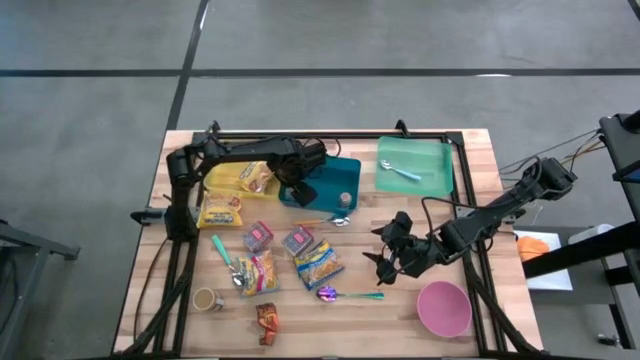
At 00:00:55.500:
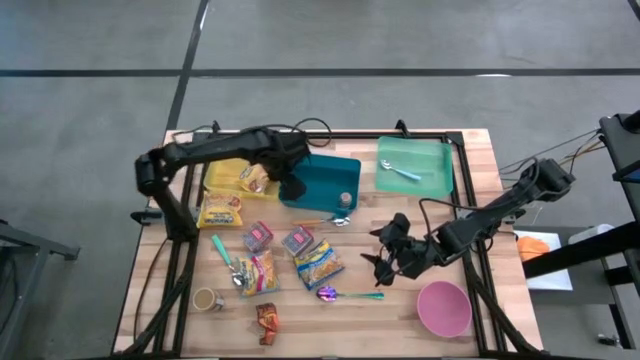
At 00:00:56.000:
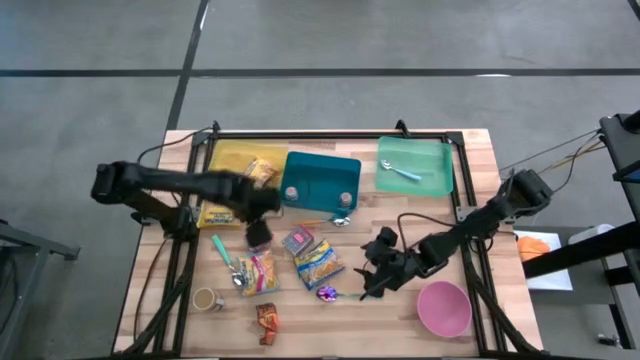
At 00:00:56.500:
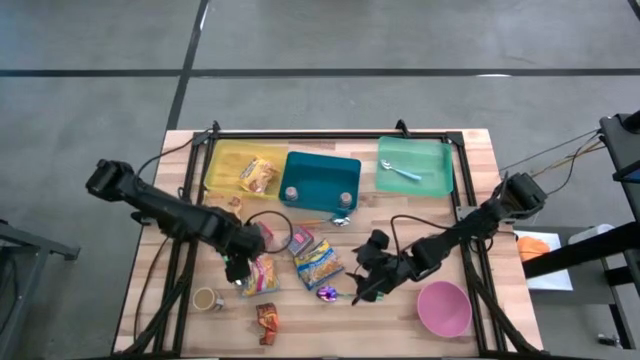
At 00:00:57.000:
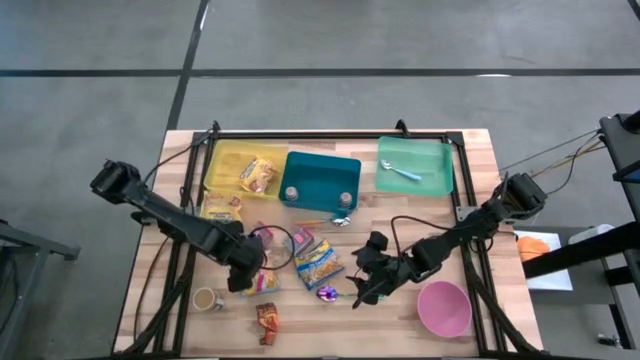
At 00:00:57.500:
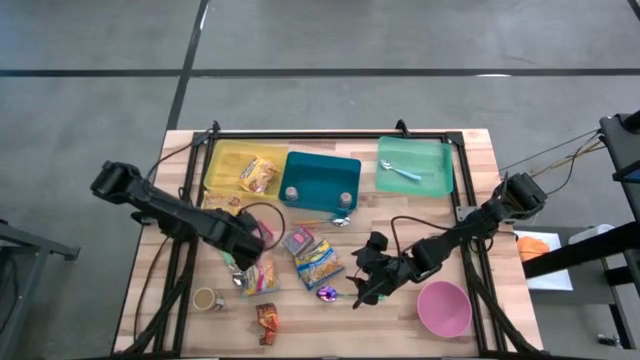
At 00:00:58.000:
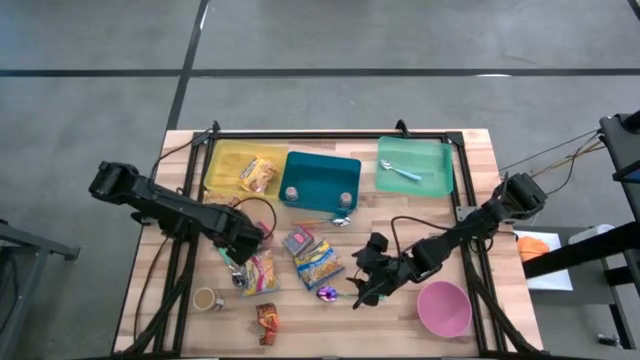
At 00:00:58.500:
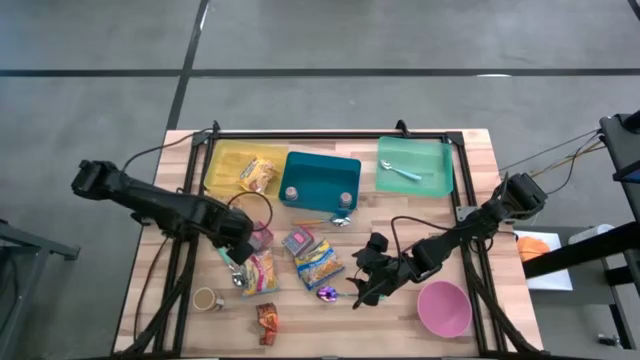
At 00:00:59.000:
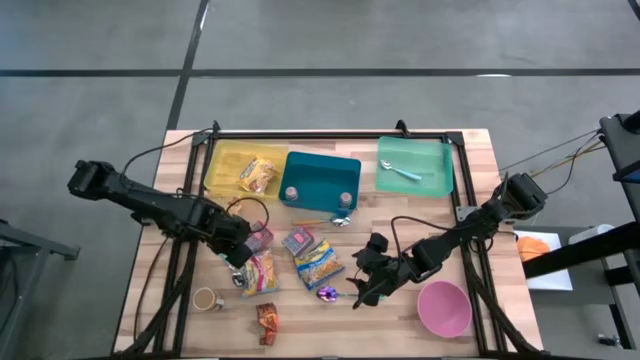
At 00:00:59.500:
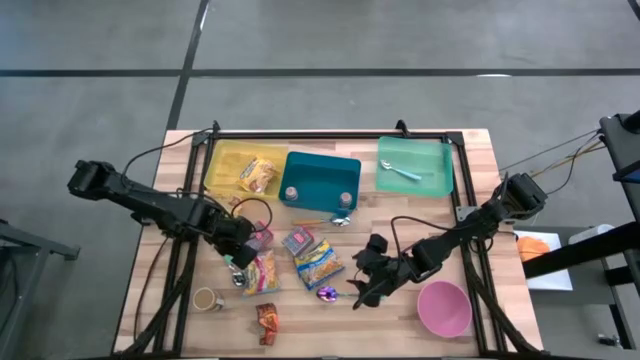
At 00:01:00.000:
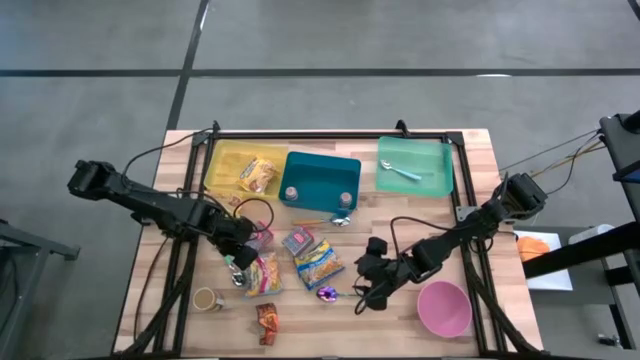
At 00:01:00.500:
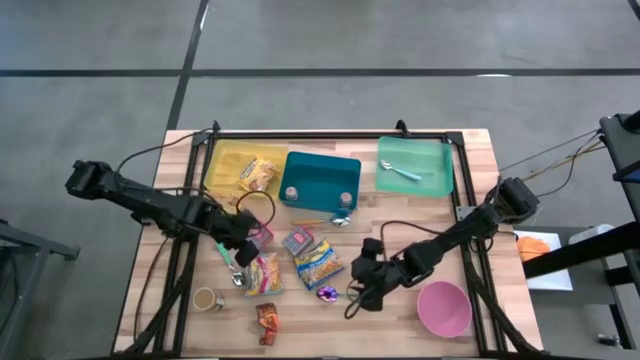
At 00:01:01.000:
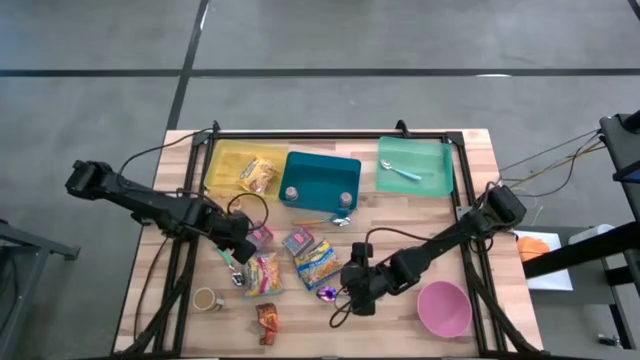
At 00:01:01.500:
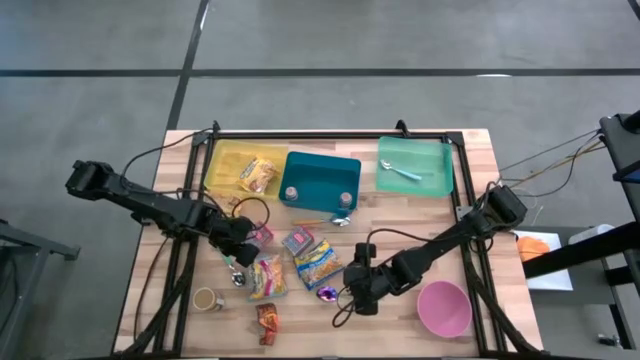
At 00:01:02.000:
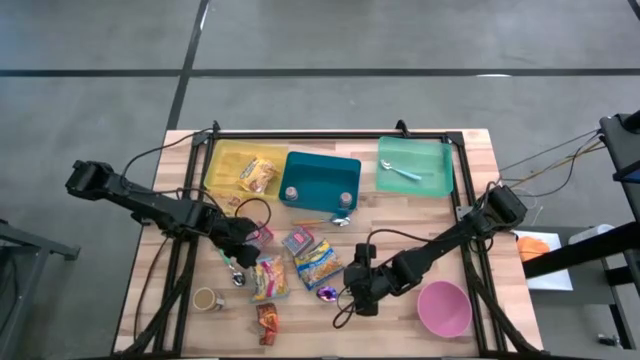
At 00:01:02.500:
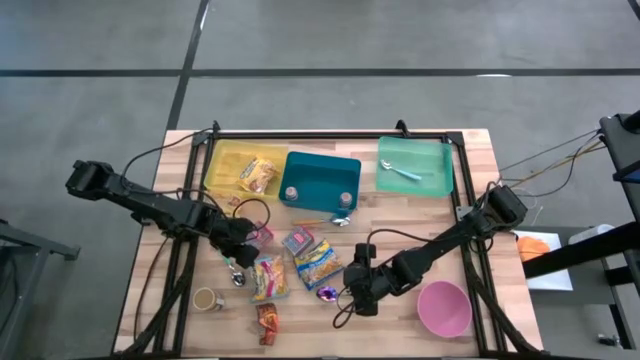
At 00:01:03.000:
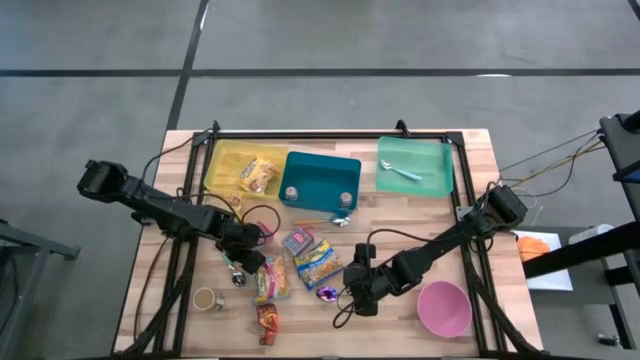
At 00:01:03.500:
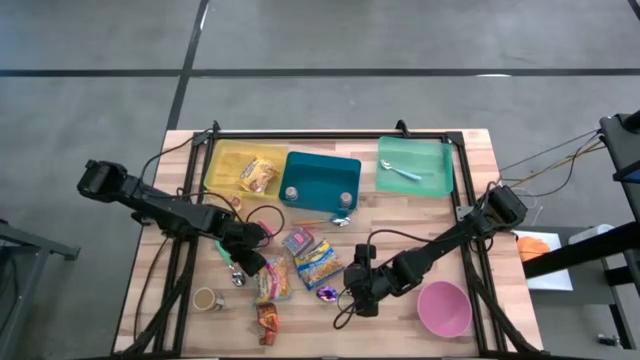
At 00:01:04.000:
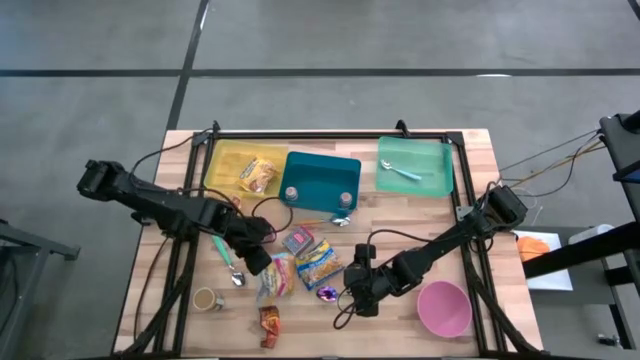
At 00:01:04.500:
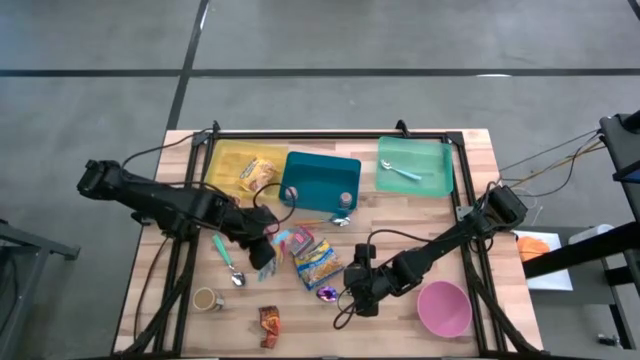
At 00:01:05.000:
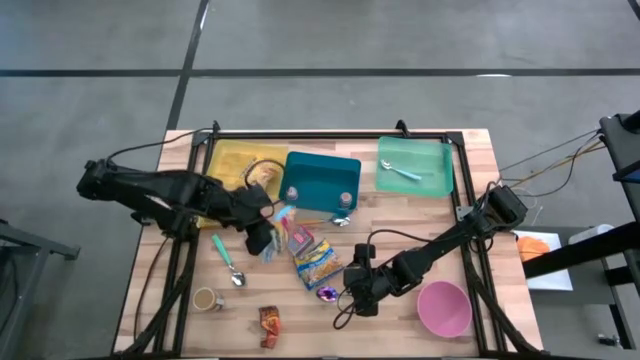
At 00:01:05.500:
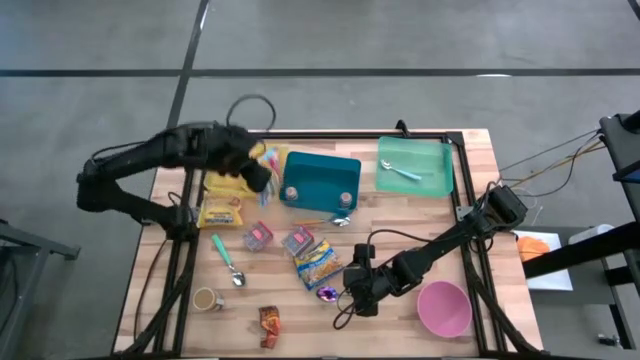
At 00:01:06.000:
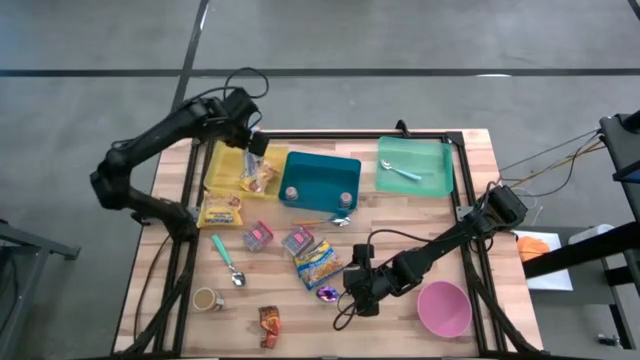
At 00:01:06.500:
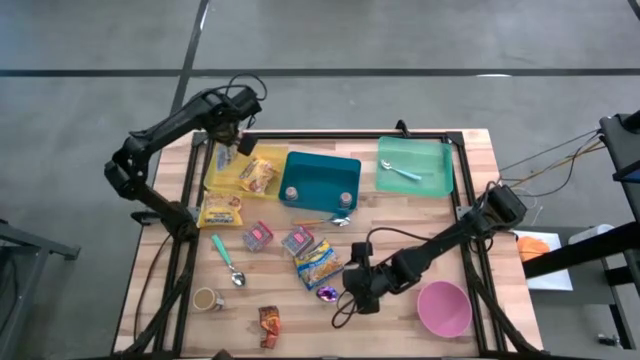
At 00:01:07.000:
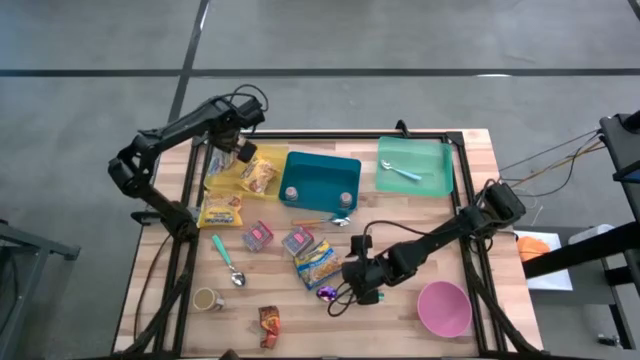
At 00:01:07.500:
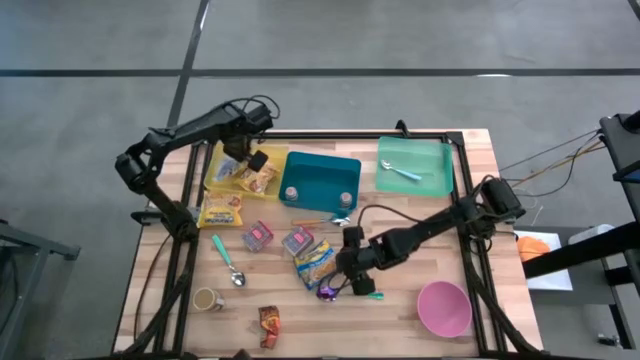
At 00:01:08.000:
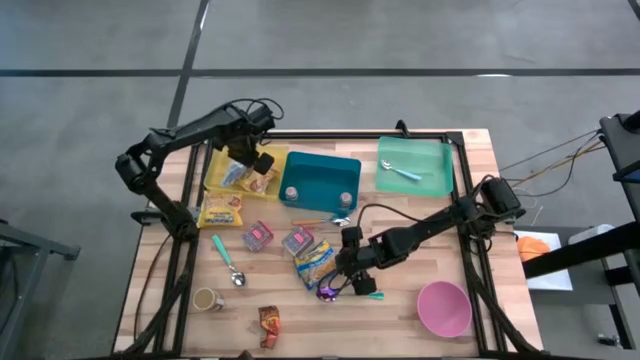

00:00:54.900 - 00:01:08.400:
Put the light blue noodle pack into the yellow bin

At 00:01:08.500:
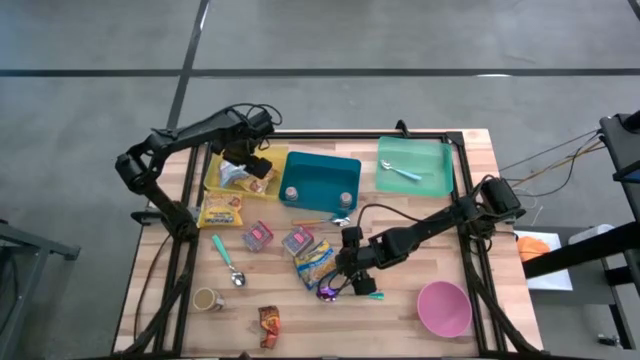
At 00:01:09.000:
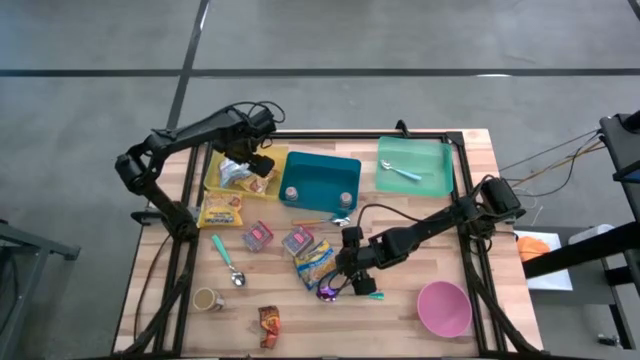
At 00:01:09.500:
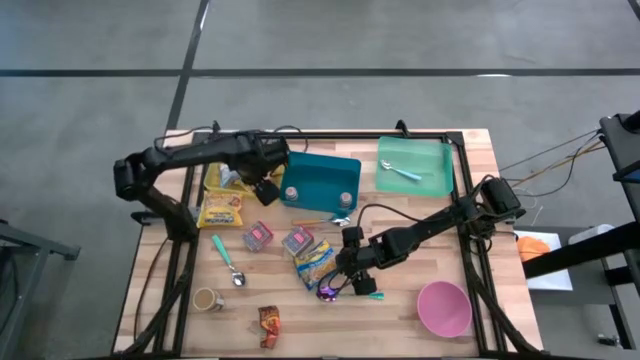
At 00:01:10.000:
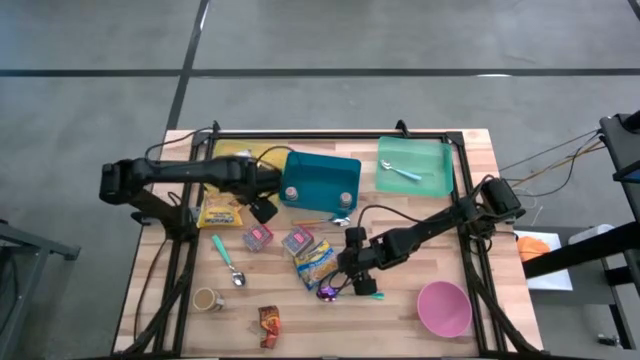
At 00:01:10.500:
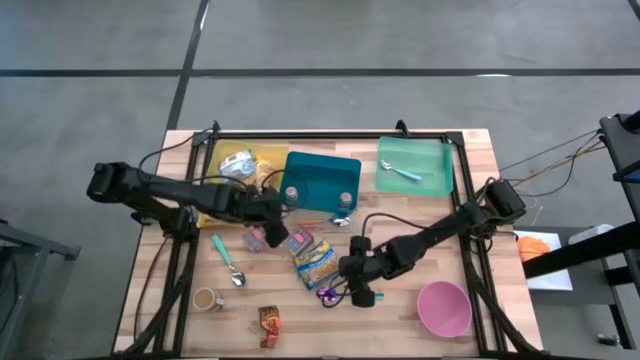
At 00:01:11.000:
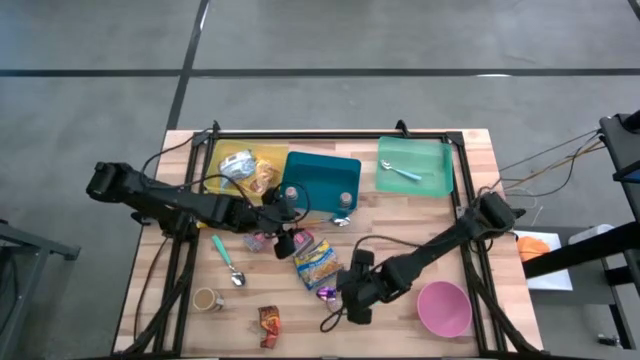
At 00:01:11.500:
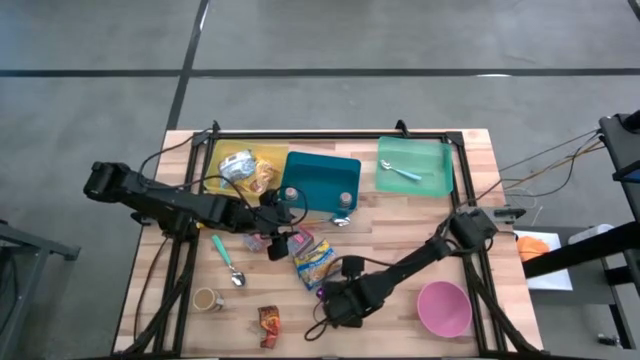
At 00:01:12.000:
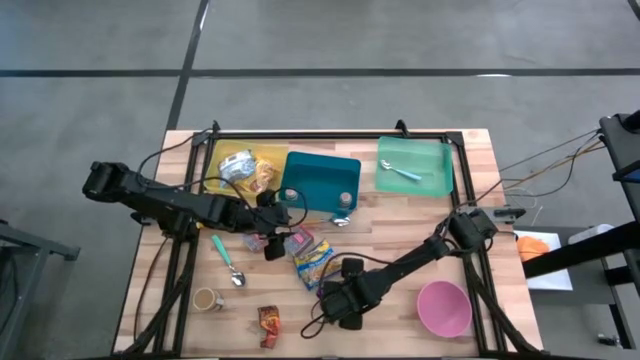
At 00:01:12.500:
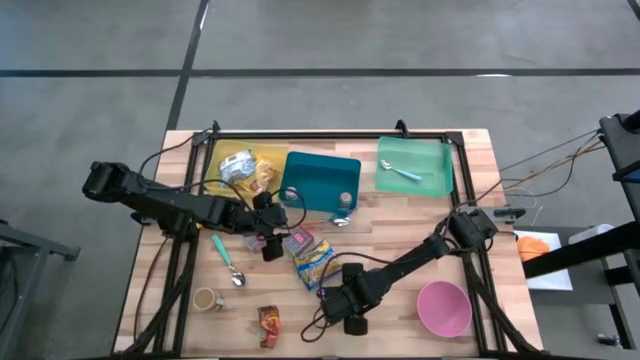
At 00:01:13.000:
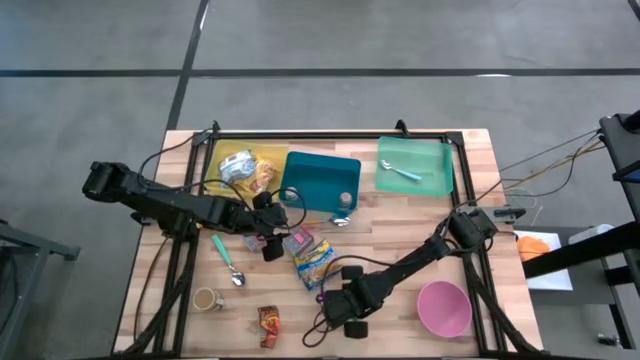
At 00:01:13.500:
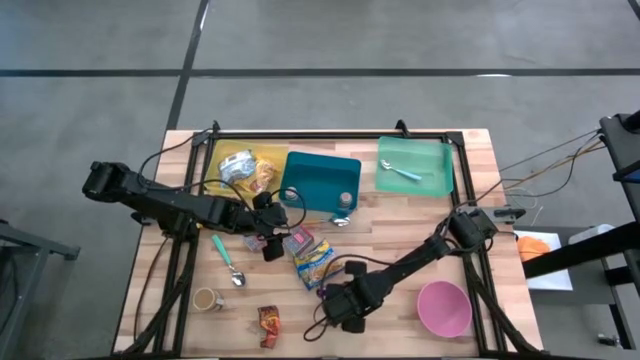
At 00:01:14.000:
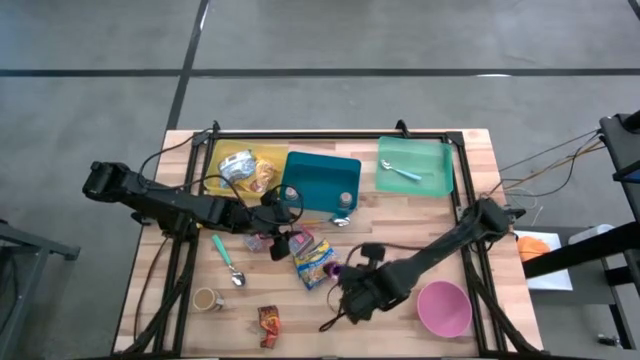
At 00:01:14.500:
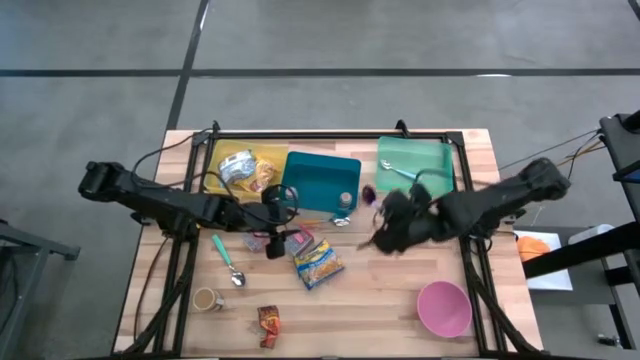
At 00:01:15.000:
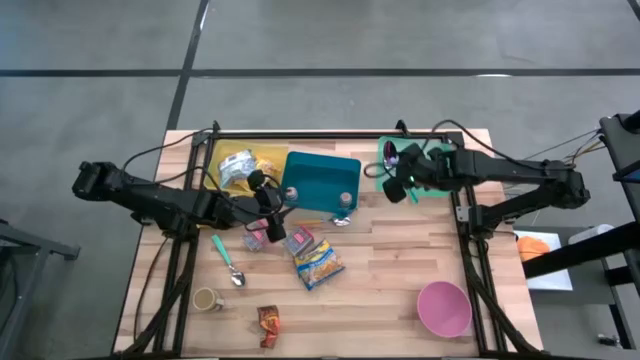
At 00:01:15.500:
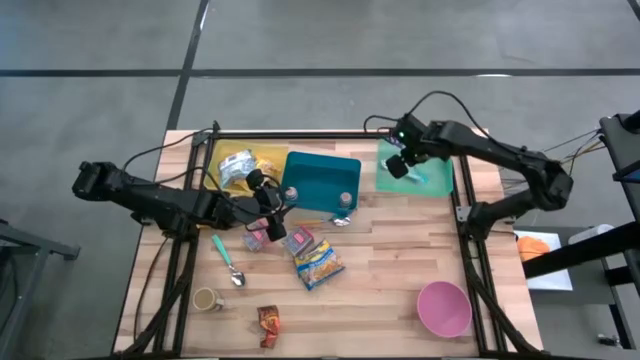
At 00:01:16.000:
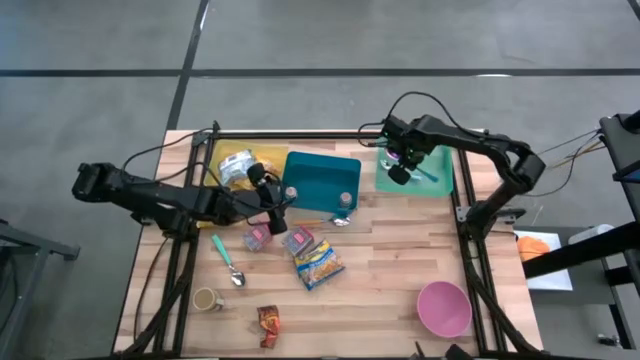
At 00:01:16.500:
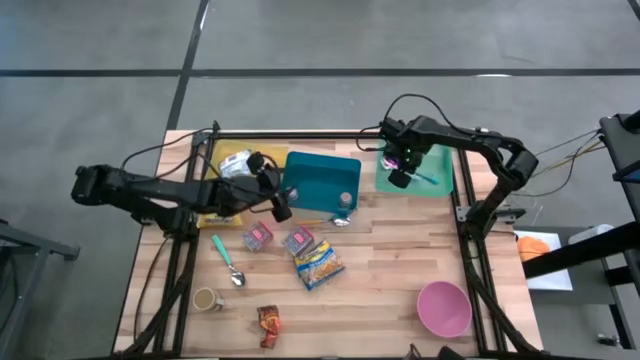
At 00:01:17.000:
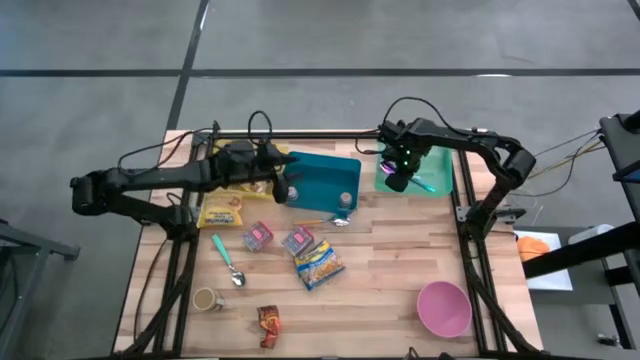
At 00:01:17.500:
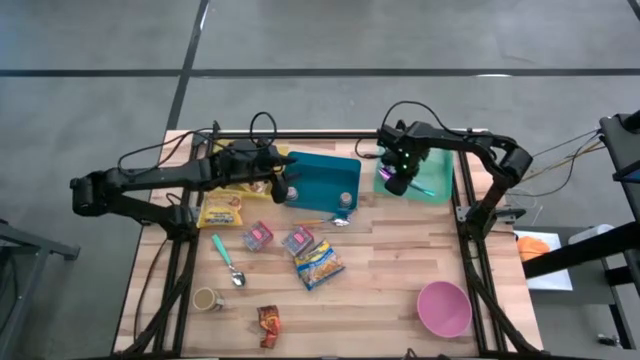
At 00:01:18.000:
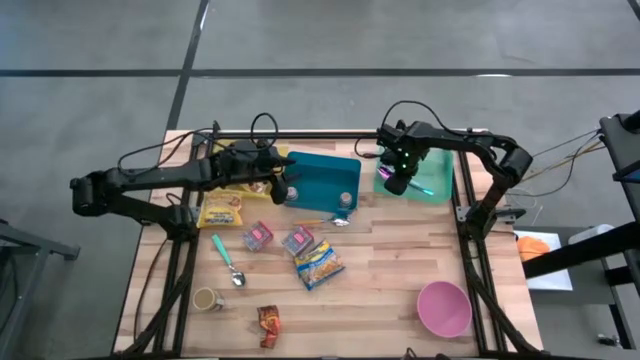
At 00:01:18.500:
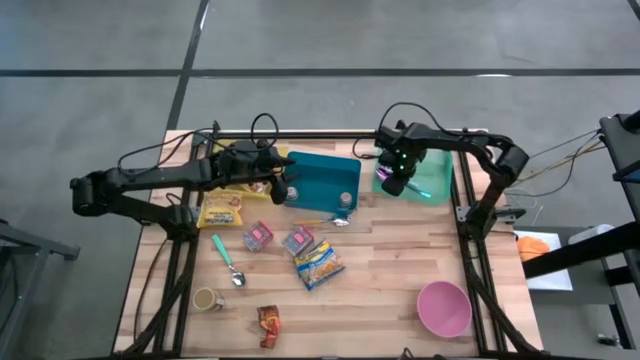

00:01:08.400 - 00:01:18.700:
Put the violet spoon into the green bin
